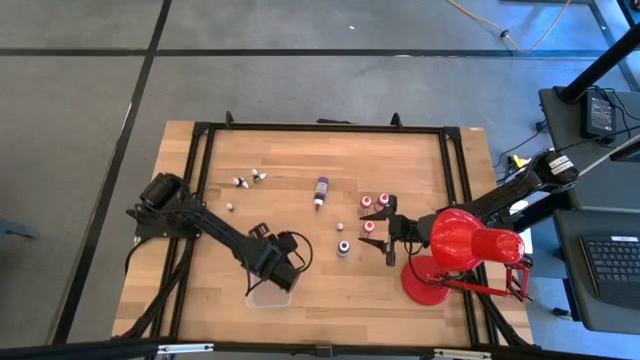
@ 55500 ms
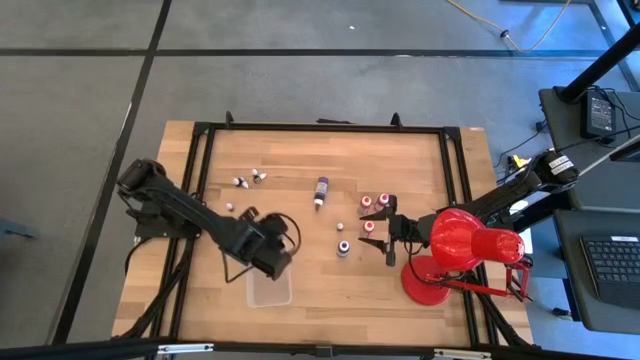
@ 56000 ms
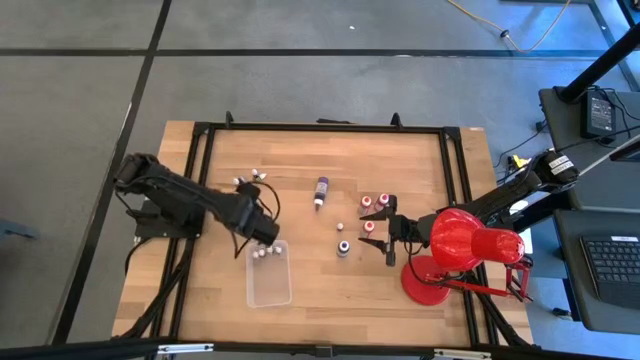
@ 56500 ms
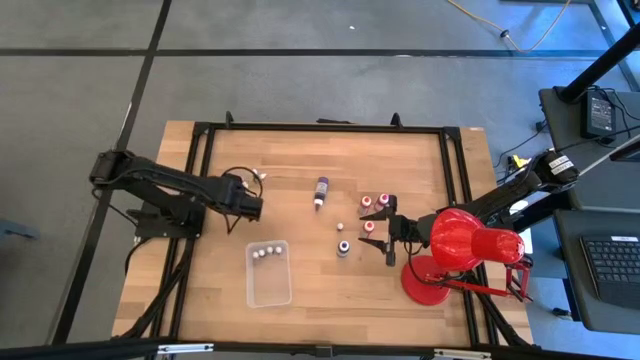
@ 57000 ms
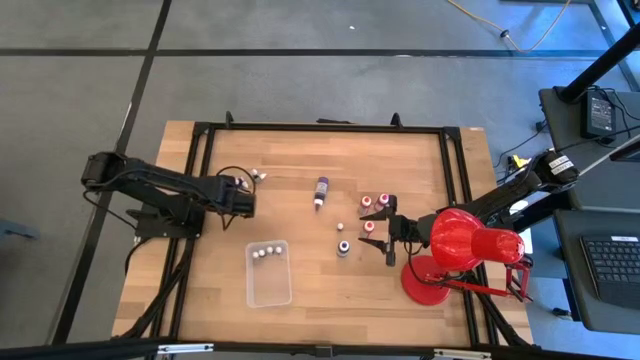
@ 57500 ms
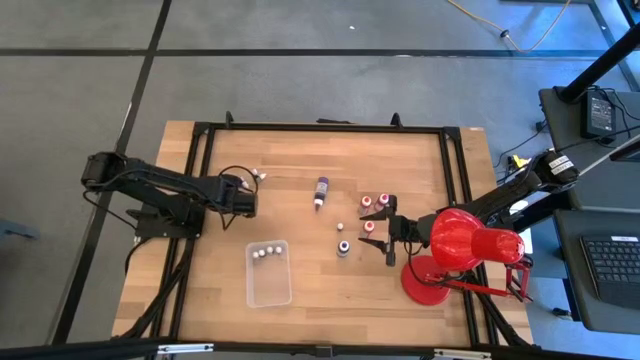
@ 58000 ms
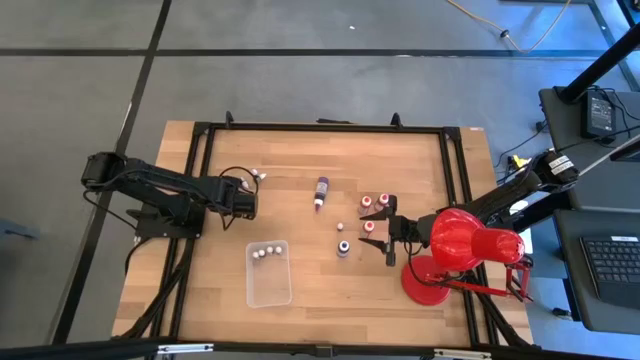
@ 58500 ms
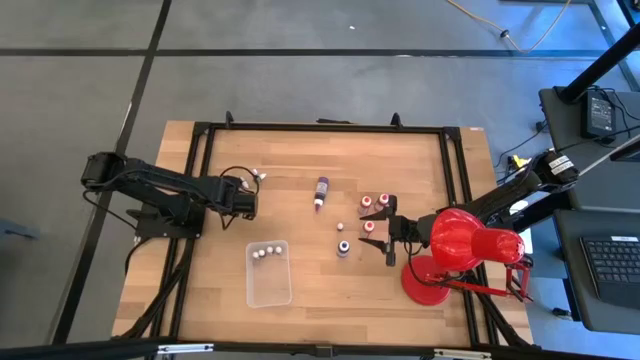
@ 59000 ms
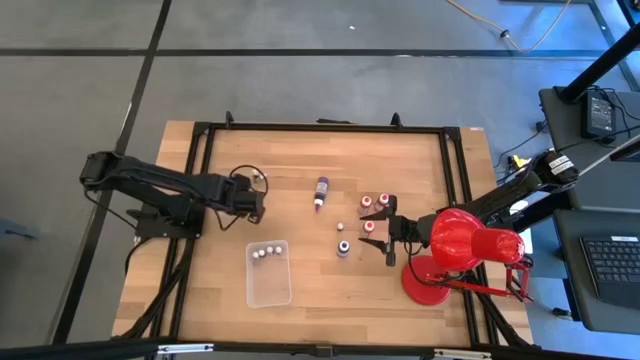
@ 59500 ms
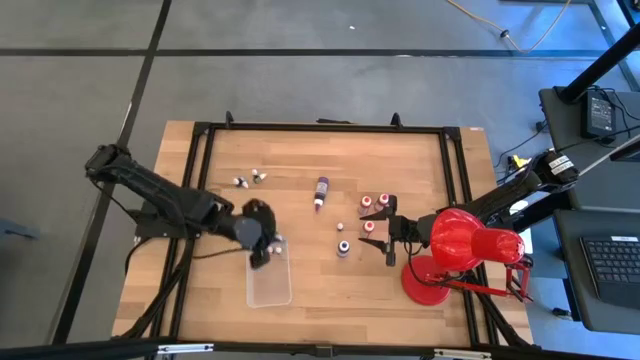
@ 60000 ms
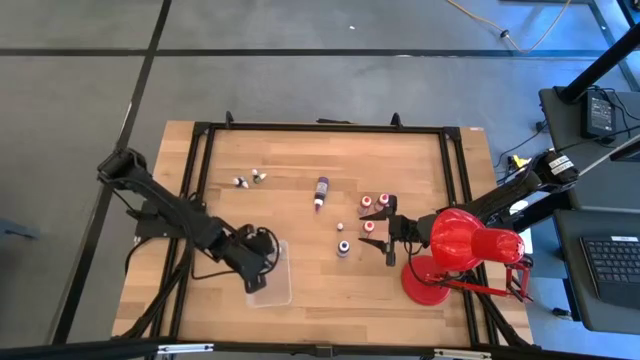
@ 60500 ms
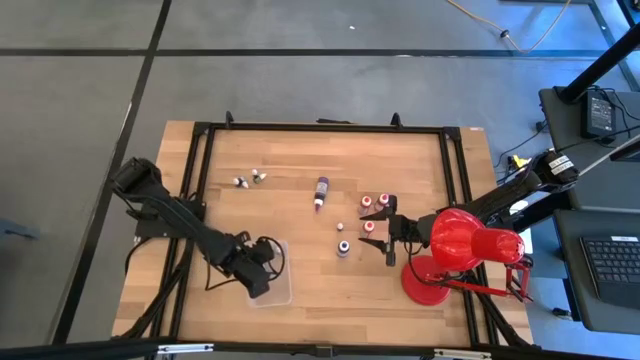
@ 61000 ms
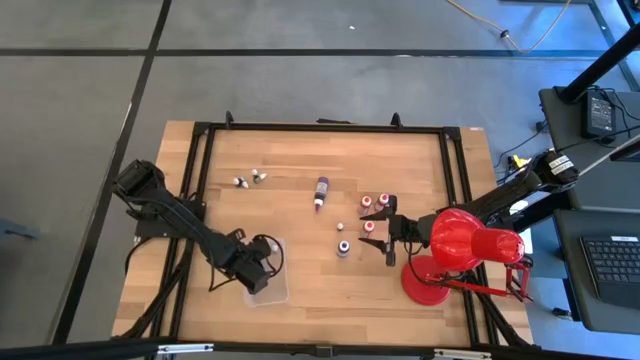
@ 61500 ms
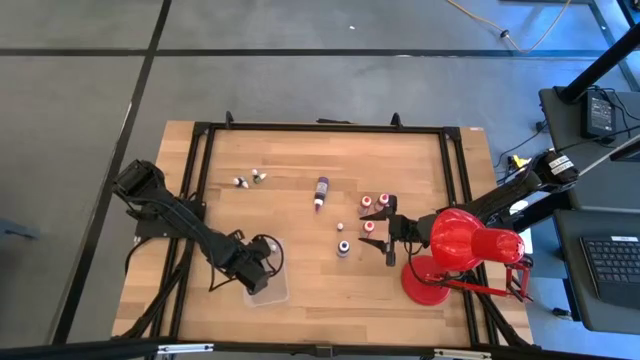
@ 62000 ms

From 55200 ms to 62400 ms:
Task: Pick & Place food coloring
Put the small blue food coloring bottle into the bin

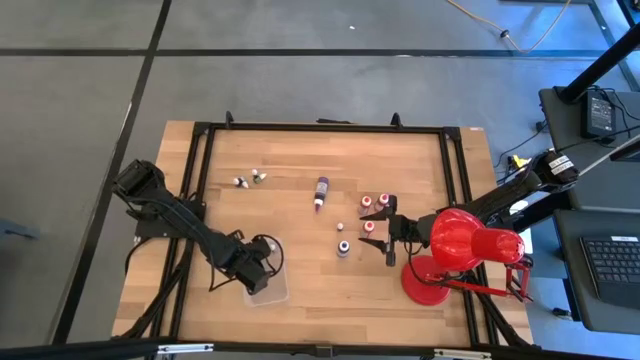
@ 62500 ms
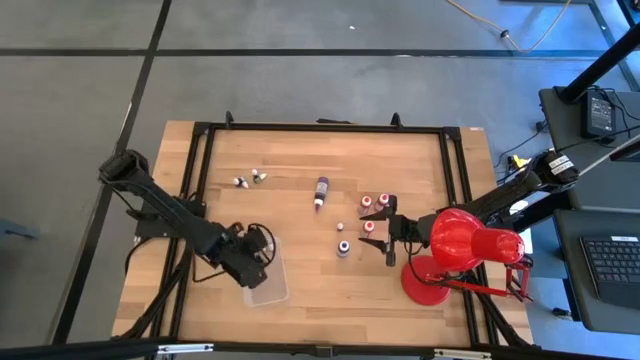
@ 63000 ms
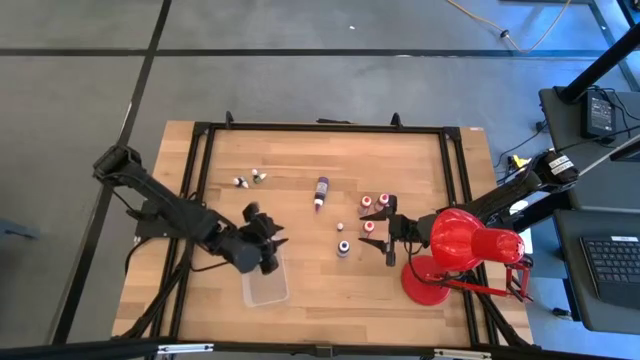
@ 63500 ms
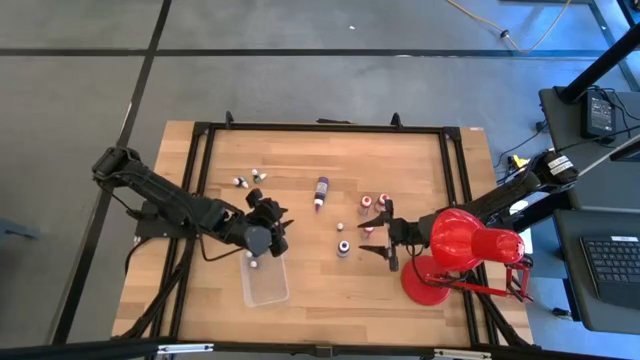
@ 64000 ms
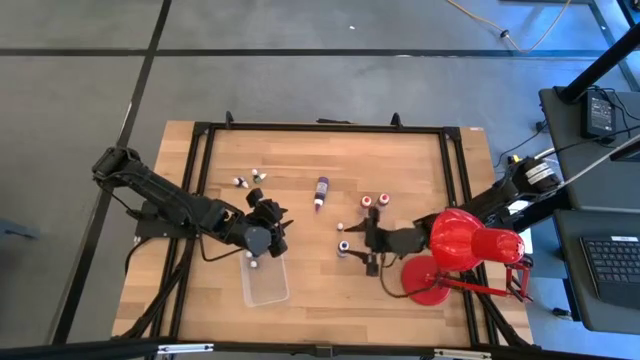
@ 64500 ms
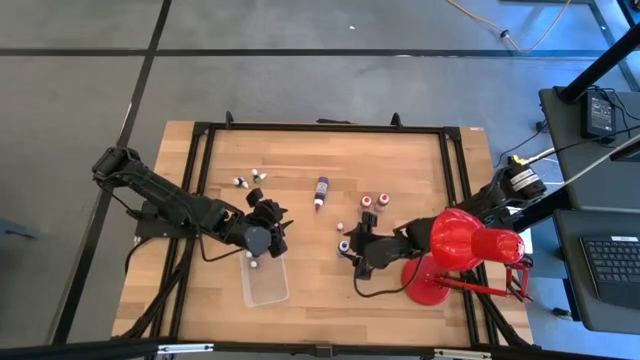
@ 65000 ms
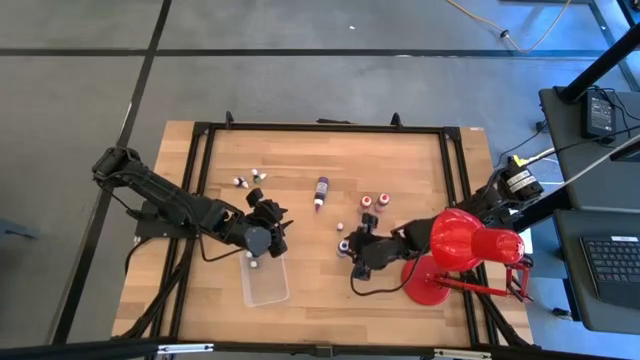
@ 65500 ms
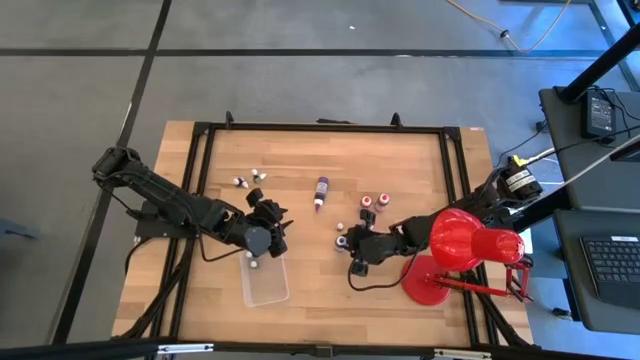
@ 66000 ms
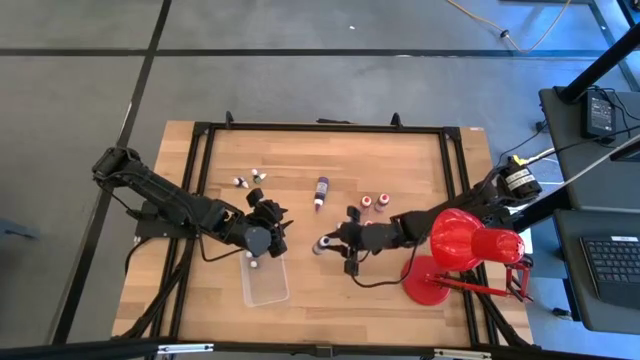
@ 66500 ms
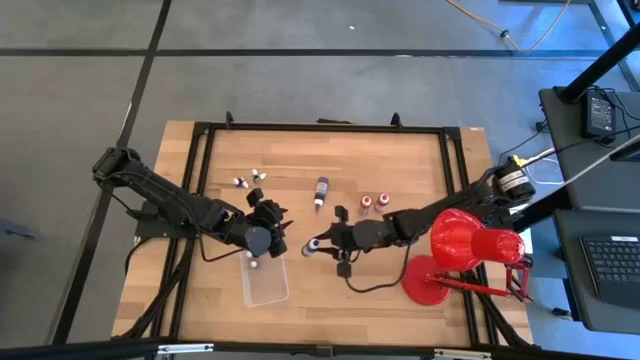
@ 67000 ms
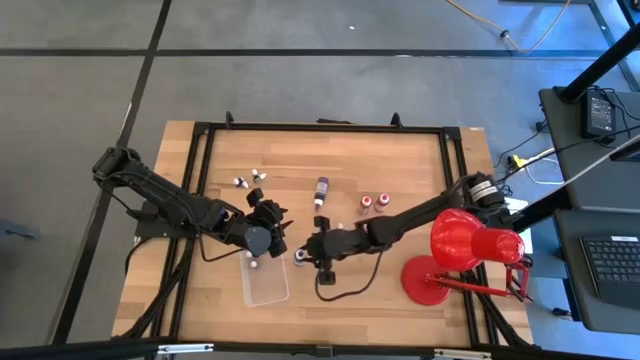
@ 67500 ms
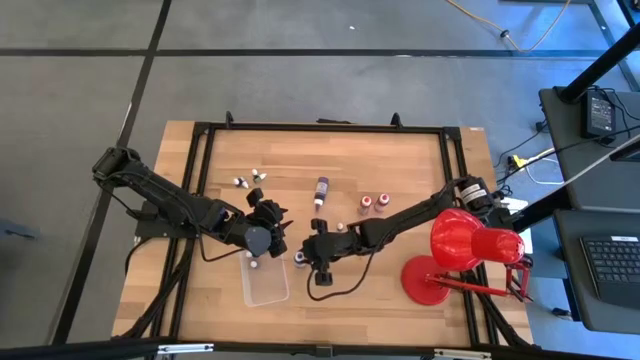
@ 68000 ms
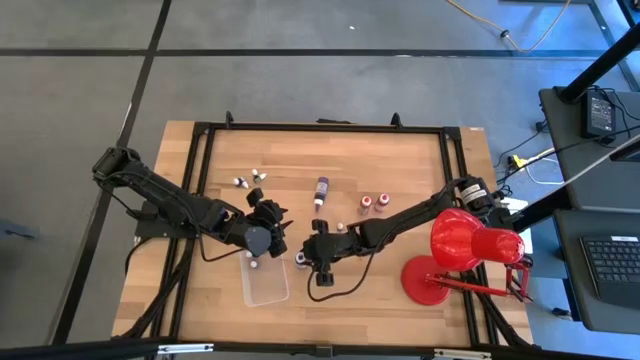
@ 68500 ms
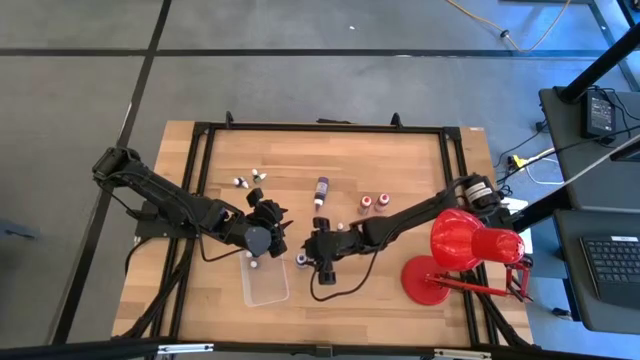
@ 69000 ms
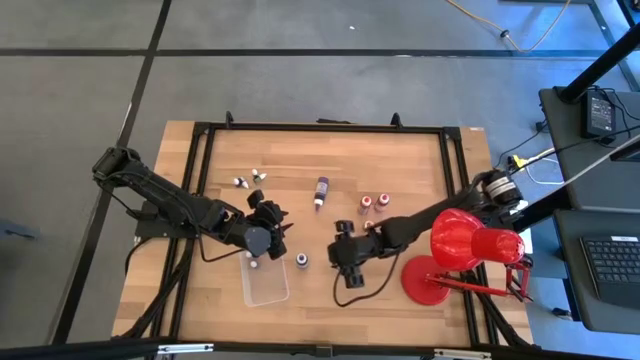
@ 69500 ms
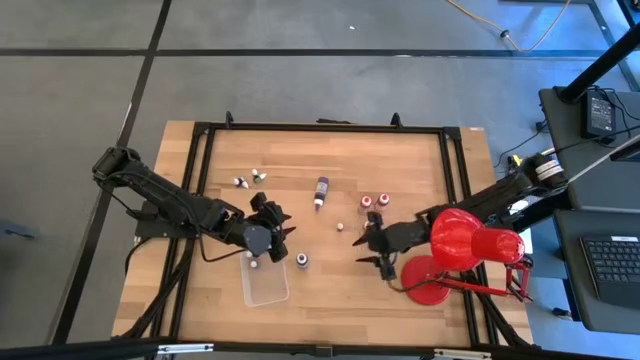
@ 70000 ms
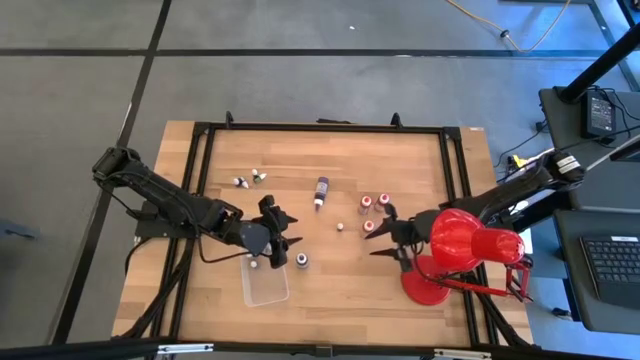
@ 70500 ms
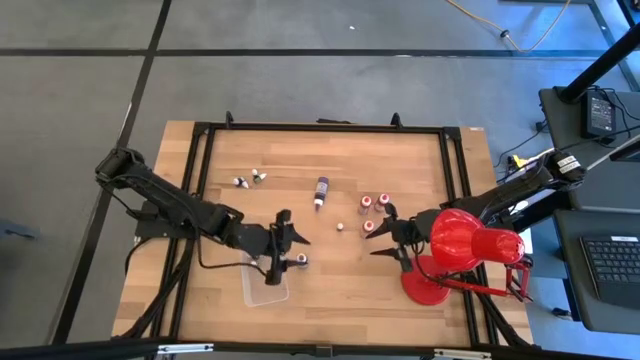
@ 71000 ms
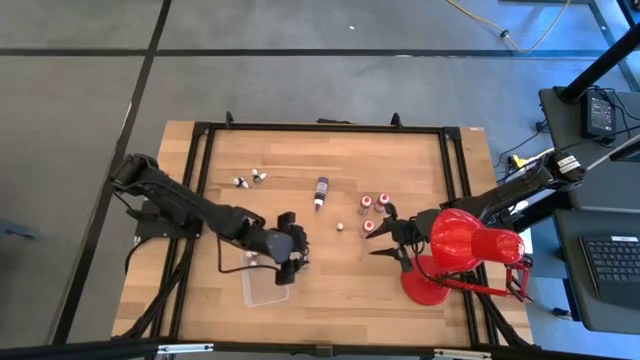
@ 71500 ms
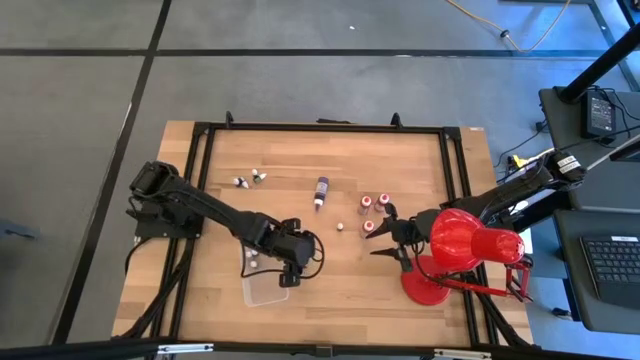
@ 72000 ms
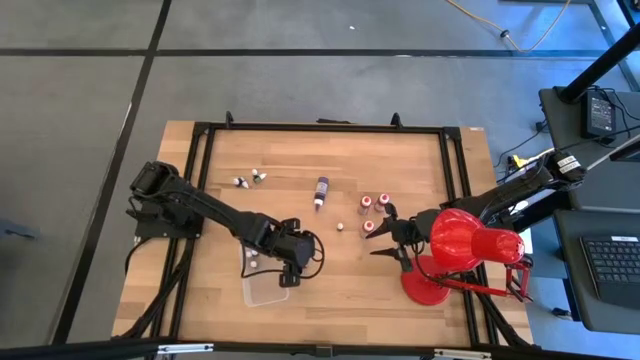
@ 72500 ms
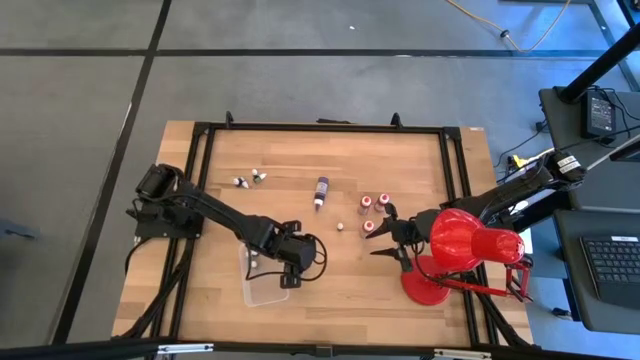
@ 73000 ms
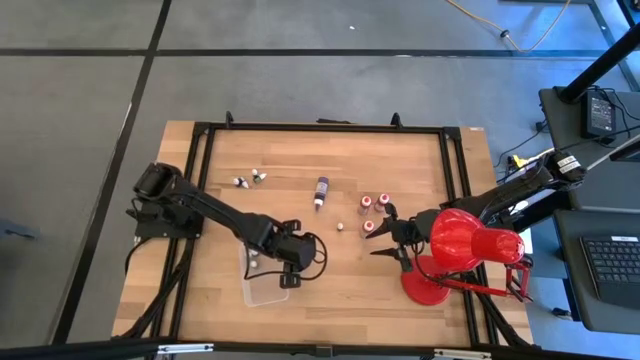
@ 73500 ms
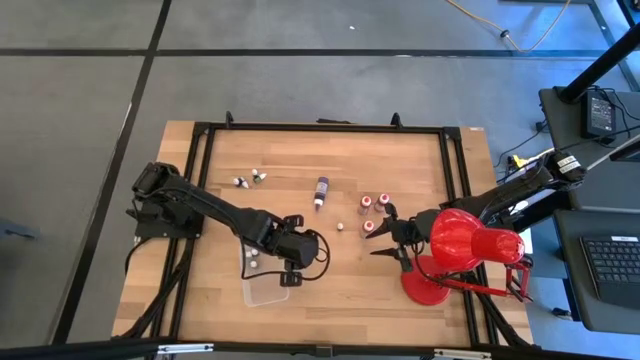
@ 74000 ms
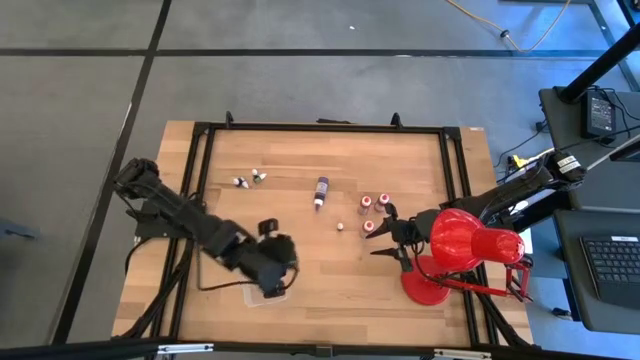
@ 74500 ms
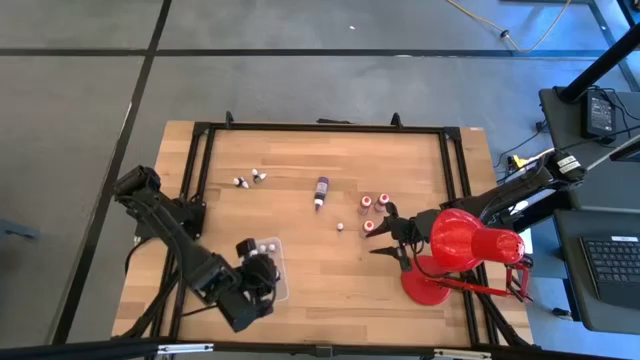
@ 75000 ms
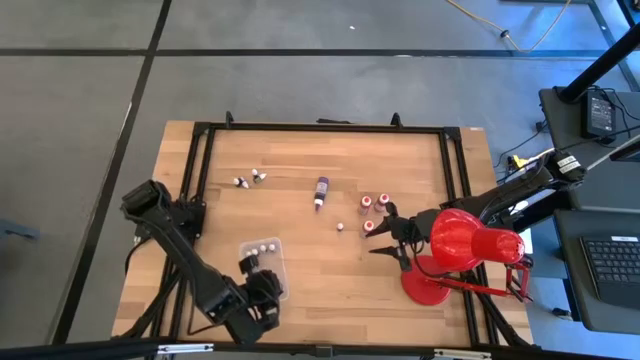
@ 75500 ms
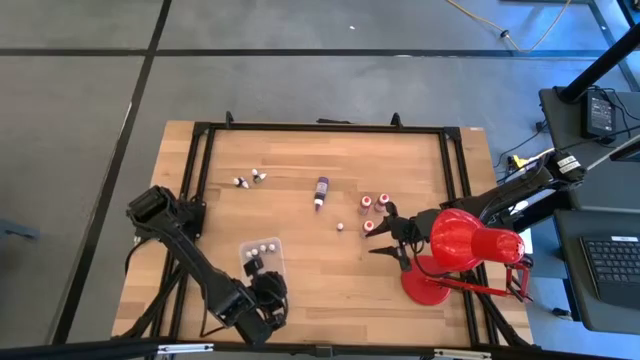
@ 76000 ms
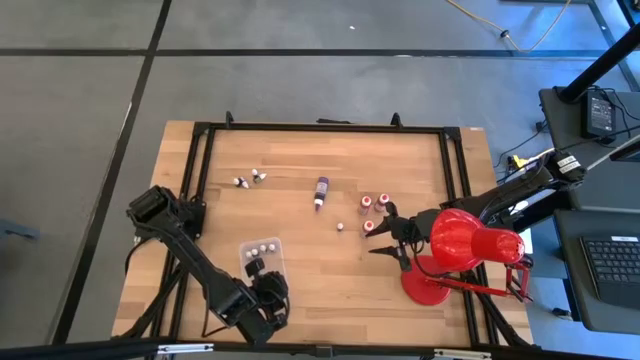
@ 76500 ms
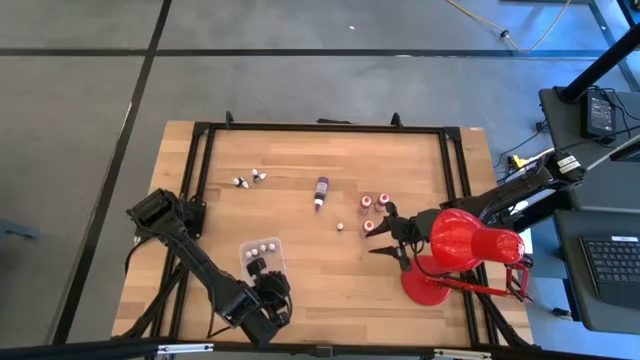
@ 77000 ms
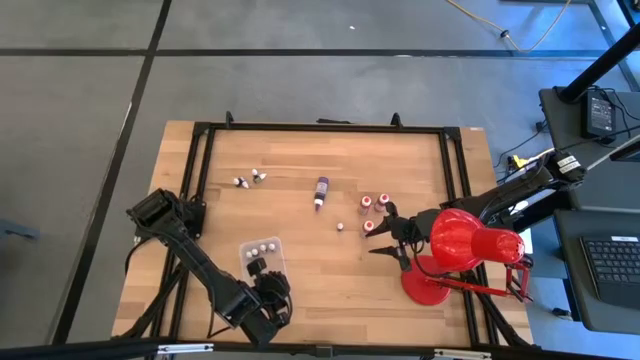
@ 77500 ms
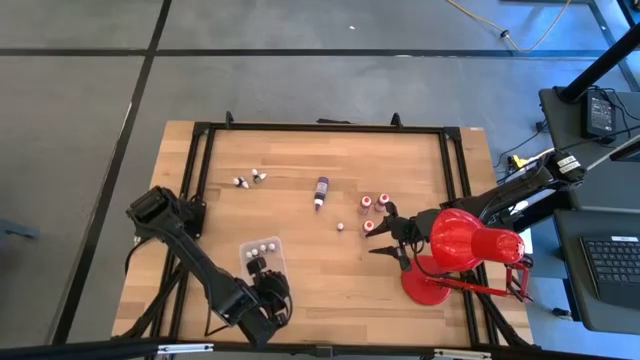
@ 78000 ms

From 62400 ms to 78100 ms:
Put the large blue food coloring bottle into the bin
